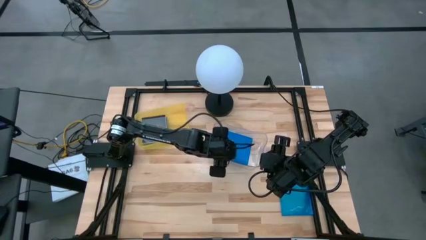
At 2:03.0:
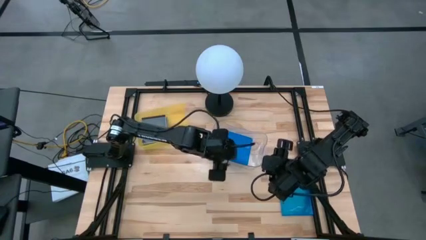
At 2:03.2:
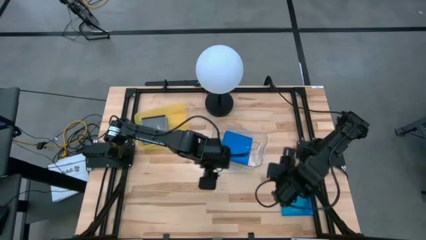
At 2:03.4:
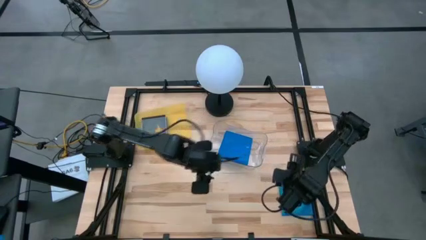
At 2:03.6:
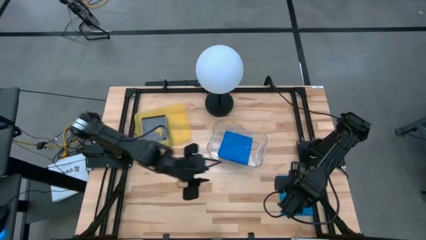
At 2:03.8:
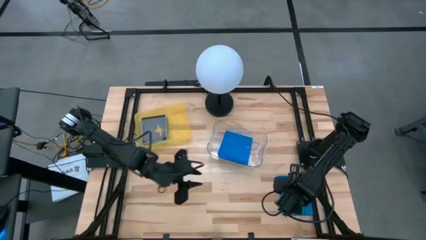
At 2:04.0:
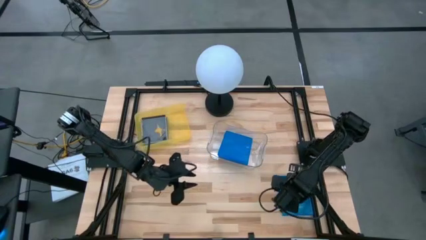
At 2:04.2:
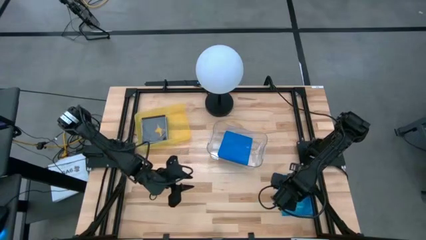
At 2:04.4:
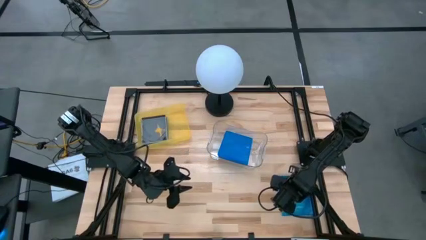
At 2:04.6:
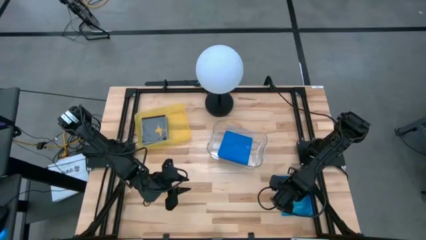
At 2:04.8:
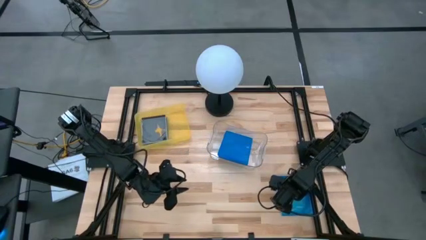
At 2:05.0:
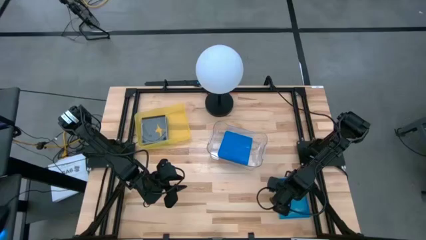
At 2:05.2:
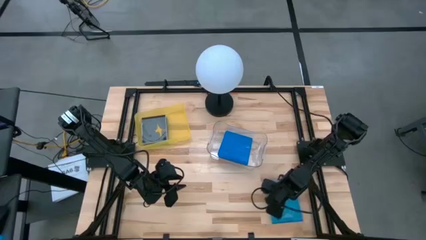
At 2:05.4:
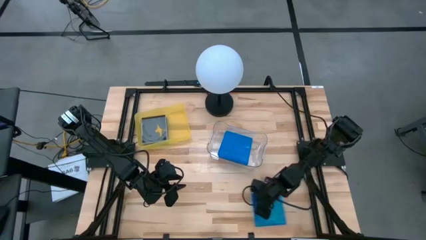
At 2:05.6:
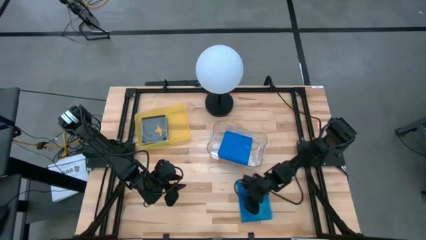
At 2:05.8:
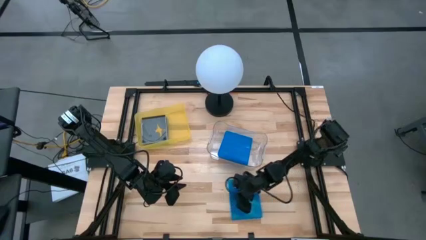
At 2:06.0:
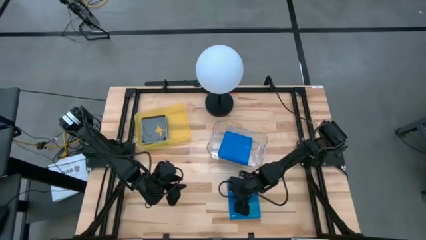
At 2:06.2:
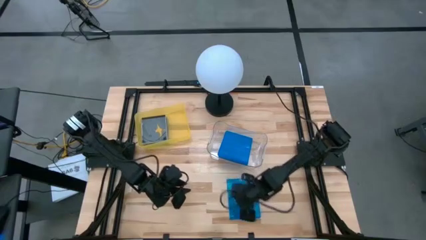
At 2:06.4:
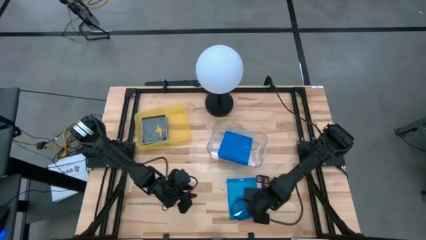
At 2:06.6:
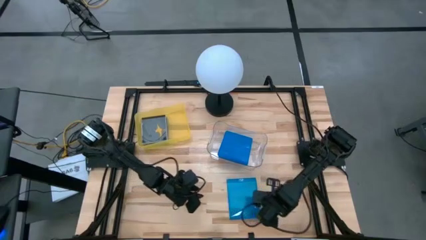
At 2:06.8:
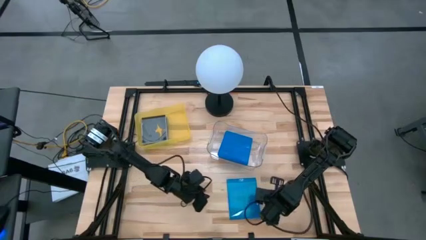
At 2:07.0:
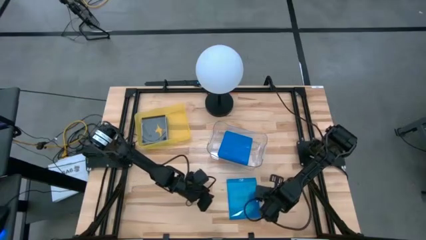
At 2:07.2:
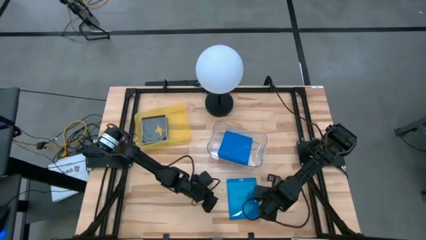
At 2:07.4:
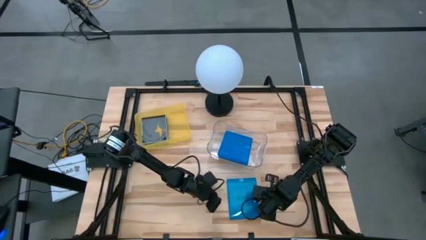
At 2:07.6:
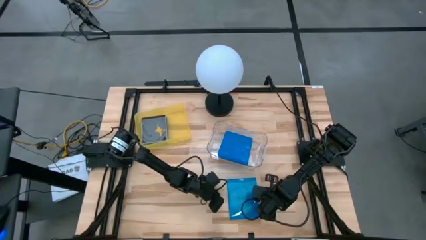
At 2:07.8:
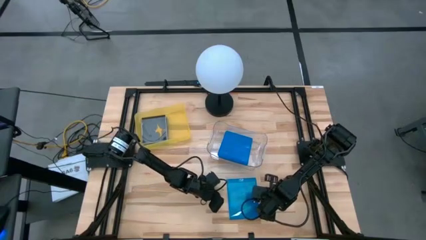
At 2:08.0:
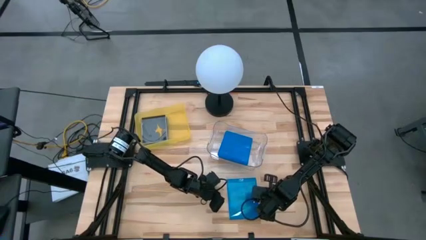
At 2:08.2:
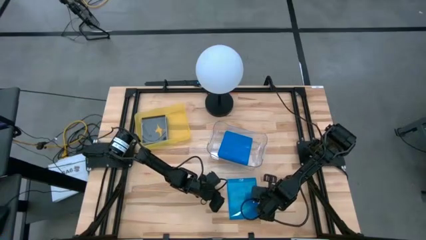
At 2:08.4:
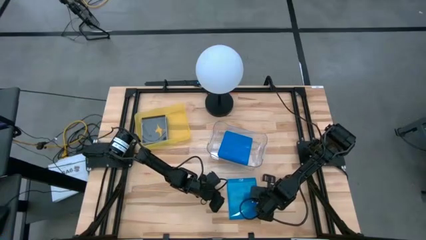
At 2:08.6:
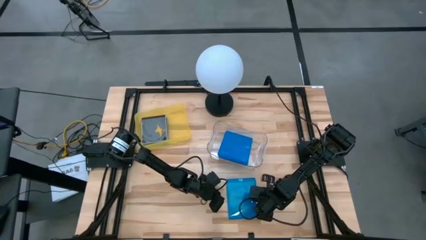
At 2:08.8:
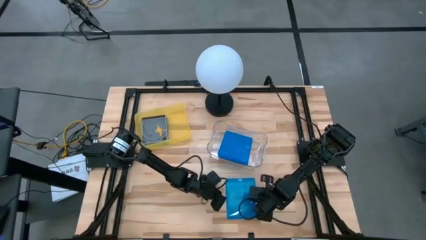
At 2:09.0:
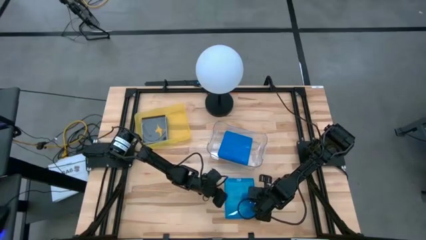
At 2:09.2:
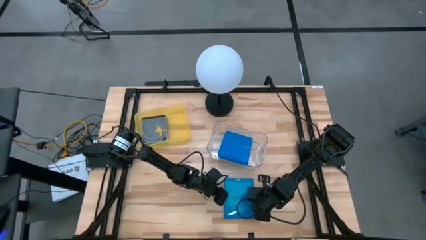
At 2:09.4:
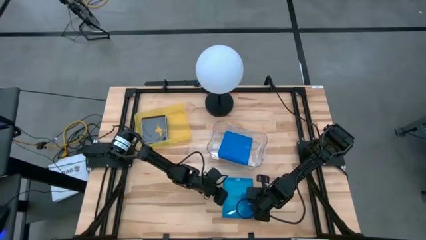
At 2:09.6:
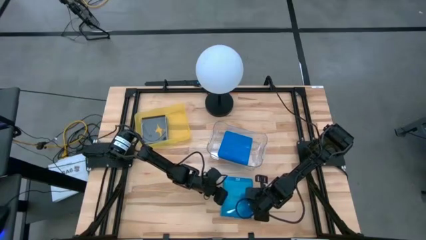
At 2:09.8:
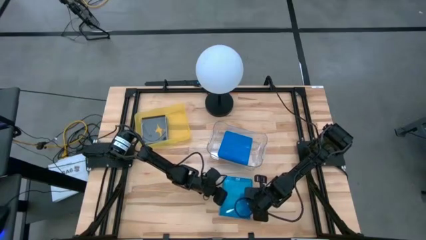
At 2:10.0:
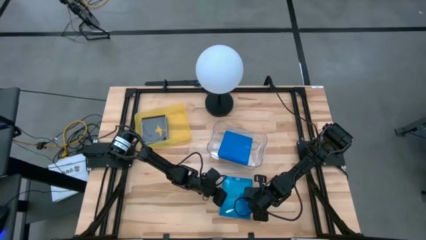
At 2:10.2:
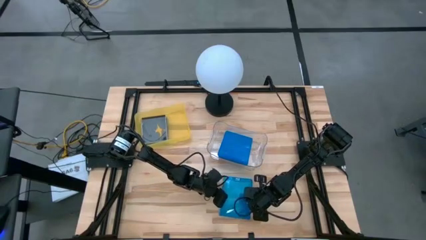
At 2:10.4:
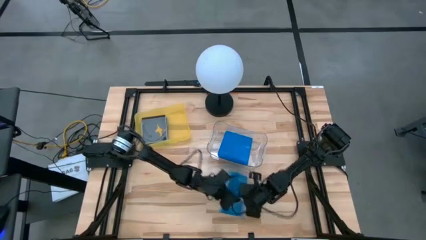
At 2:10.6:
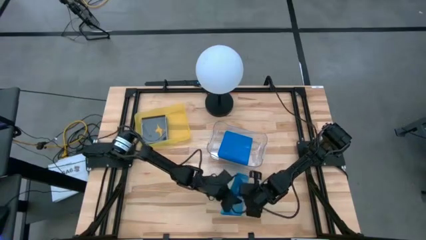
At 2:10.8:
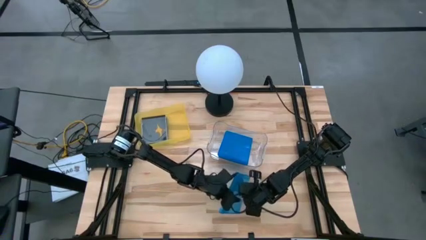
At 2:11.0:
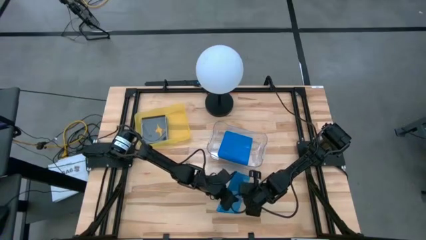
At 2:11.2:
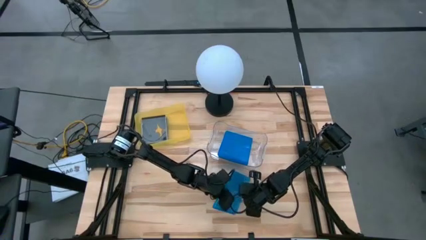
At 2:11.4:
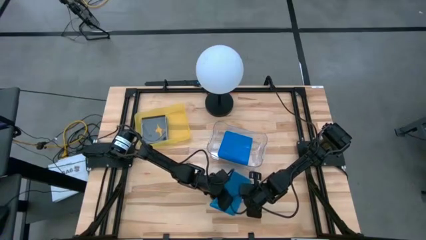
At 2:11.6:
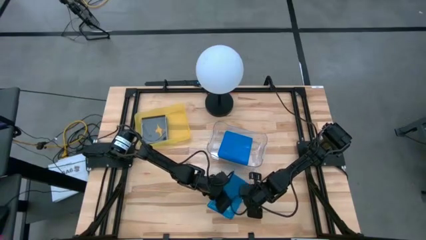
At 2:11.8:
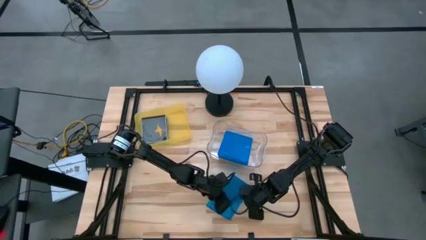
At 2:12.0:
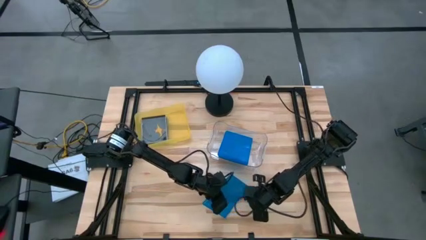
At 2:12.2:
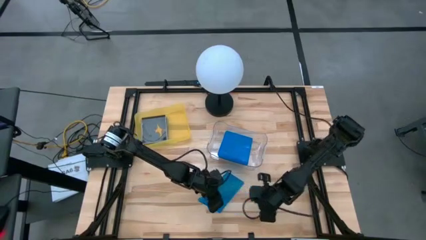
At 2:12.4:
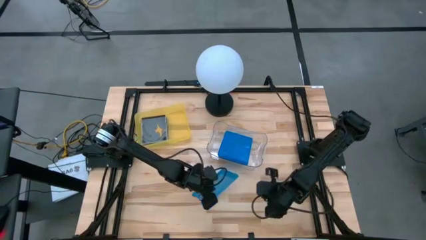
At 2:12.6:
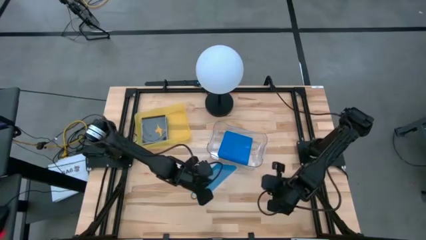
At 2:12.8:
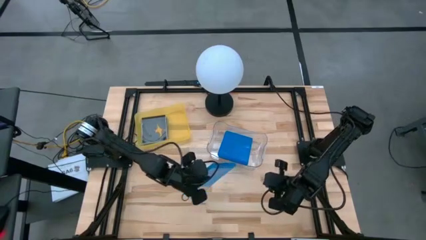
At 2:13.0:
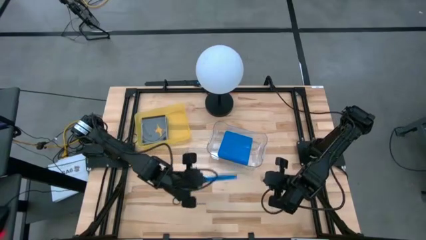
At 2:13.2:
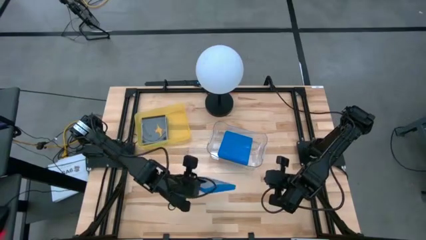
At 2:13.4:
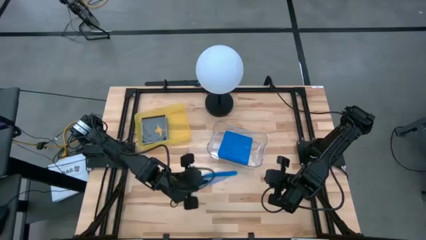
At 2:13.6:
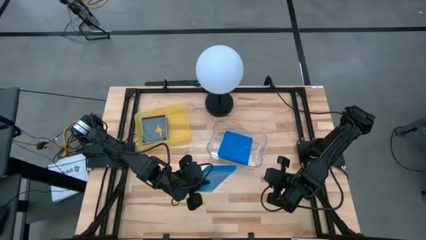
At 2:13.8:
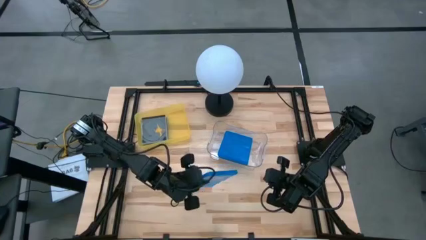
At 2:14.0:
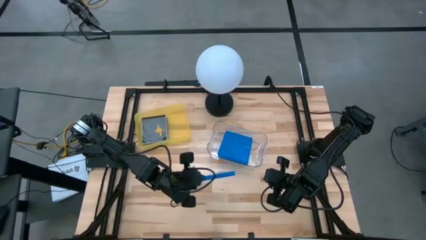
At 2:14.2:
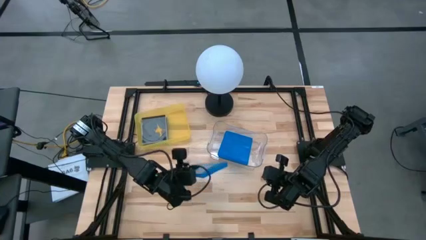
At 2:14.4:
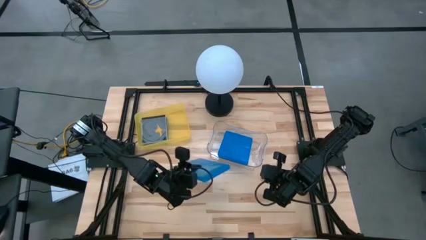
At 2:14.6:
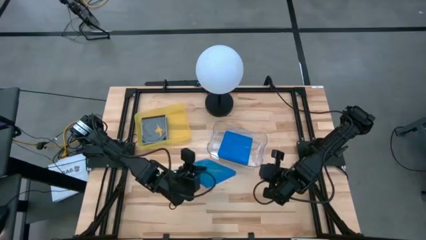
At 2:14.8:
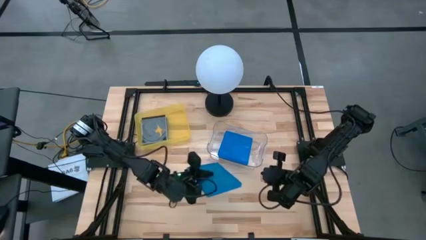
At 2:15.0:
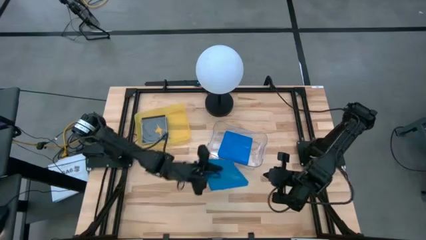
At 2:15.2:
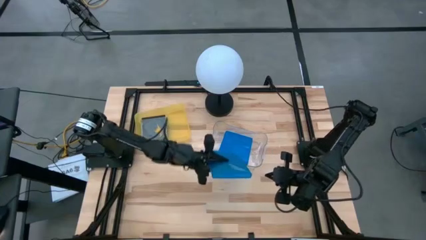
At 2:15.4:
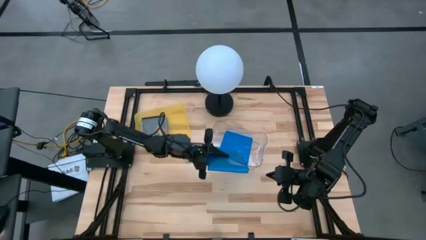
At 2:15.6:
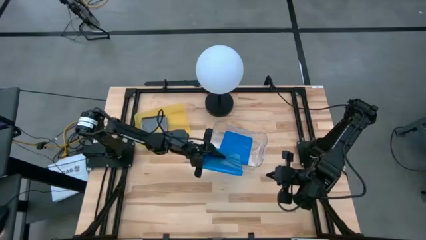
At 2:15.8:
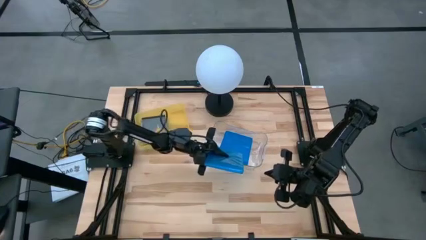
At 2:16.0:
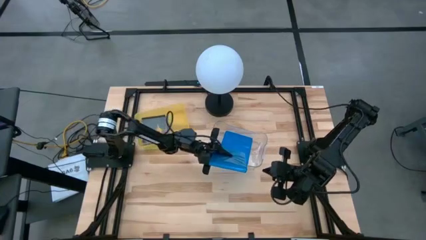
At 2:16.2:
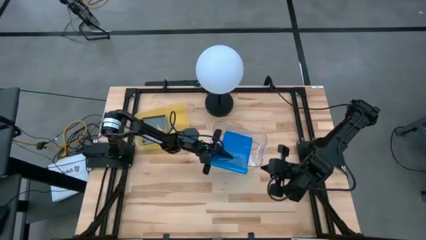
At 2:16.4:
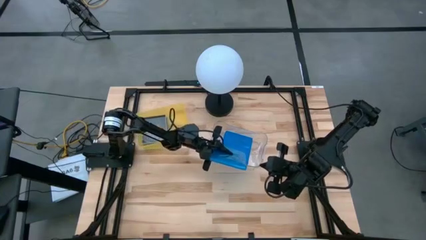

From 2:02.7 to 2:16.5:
Task: Pick & place jewel cases by type
Put the blue CD case into the transparent bin

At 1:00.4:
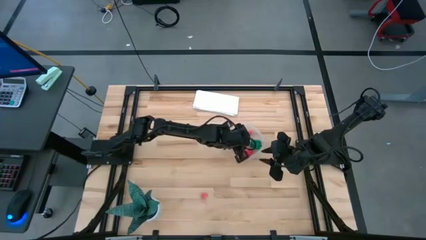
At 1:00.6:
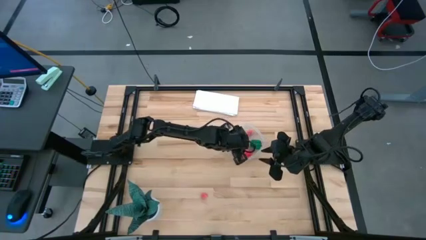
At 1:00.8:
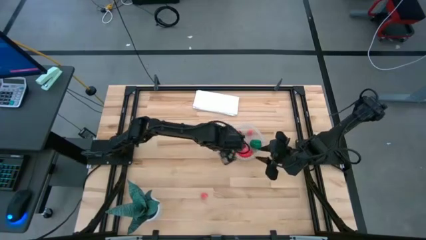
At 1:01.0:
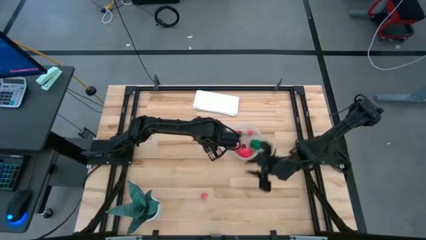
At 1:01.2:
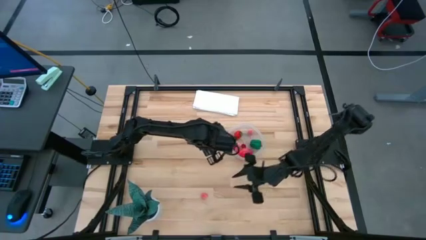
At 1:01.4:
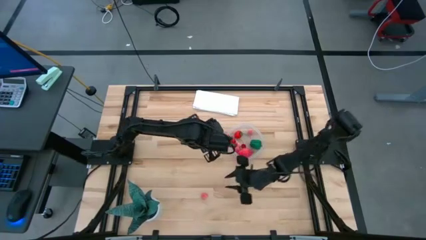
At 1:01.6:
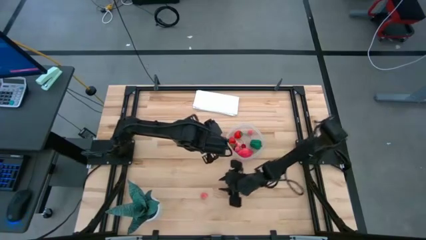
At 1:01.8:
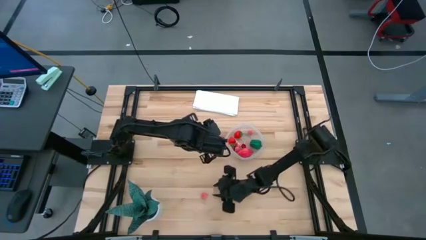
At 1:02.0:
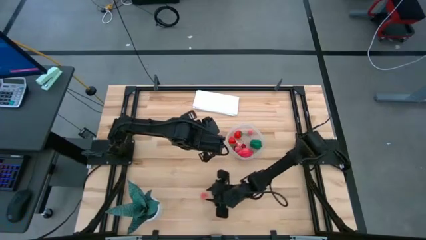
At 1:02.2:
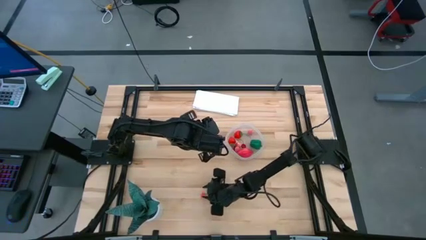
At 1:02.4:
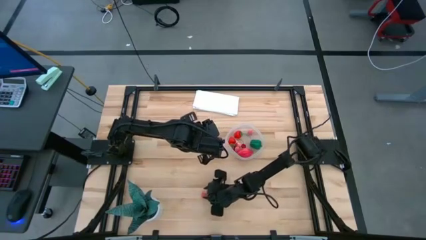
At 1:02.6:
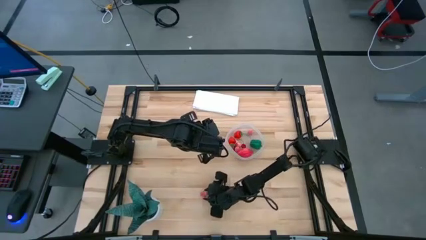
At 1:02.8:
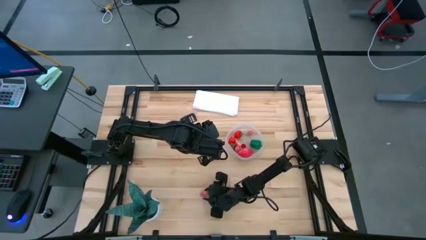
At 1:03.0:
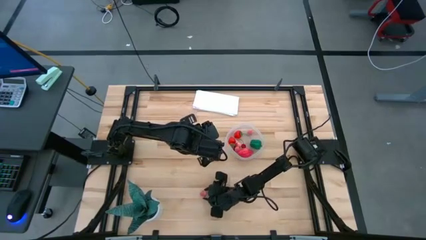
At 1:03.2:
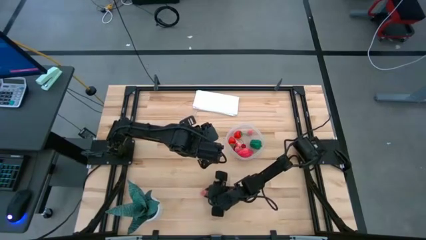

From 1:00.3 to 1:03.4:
Task: Pick and placing Produce into tupperware
Put the pink peach into the transparent bin
